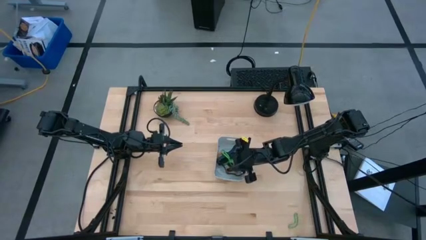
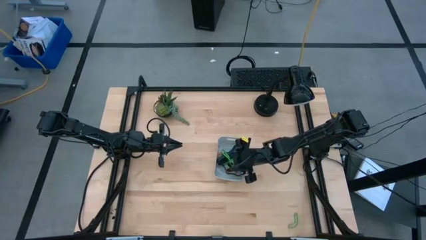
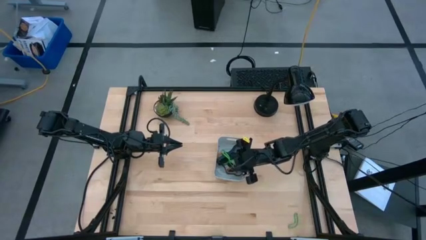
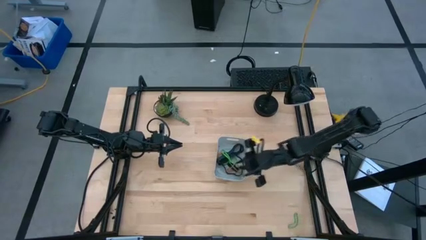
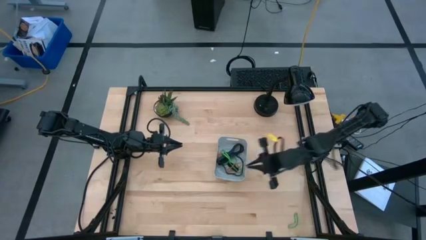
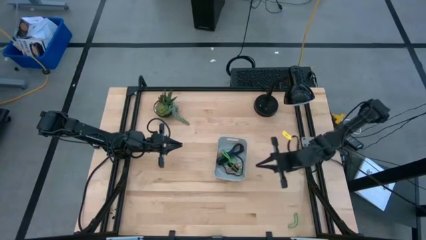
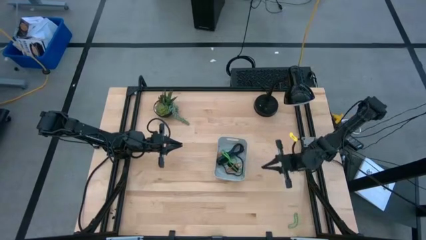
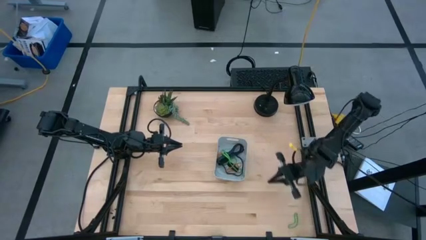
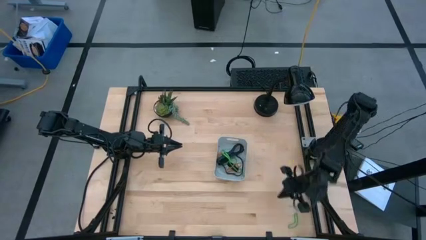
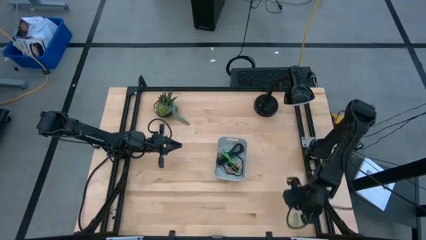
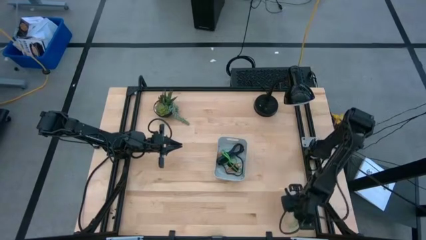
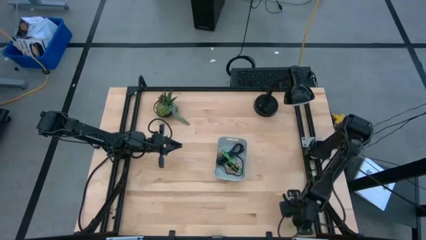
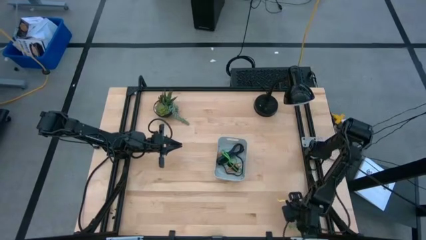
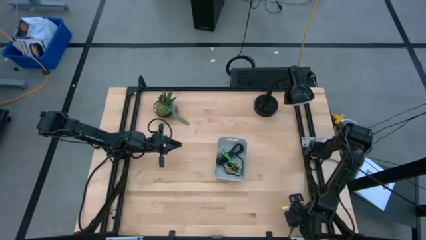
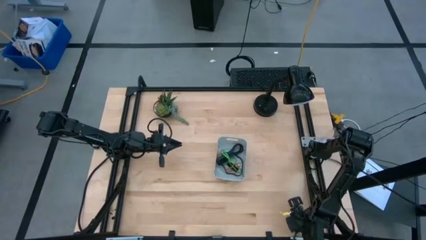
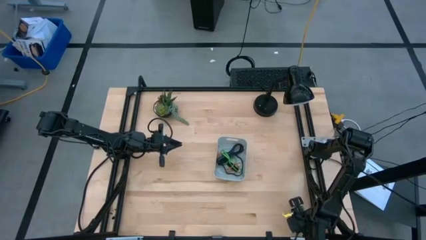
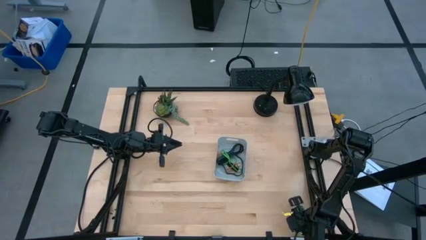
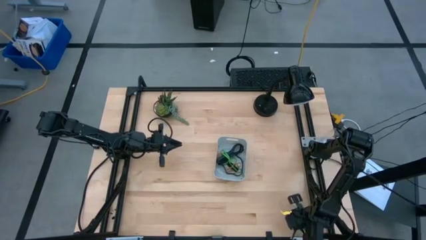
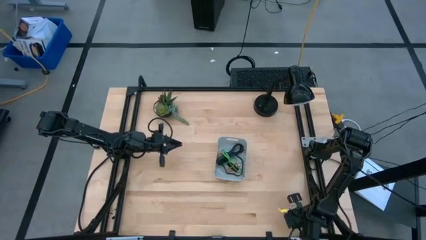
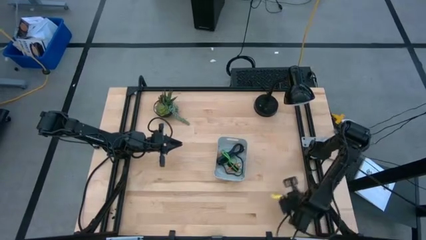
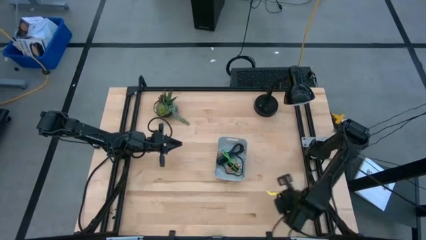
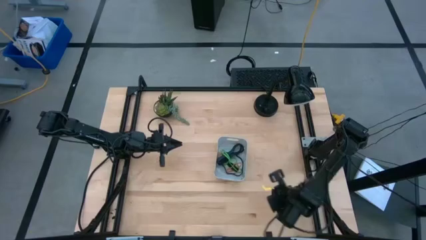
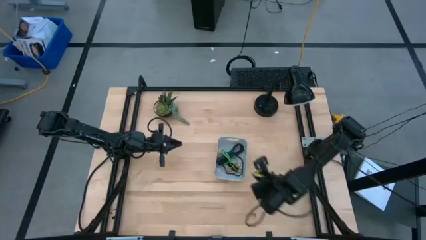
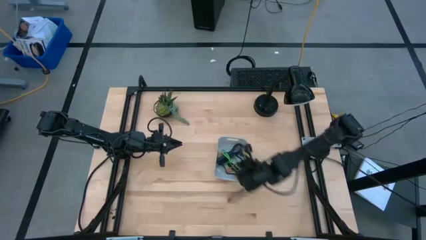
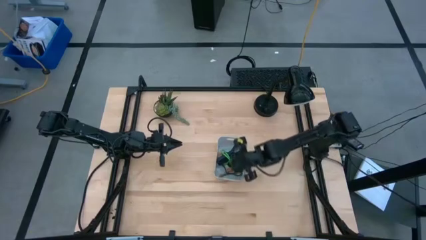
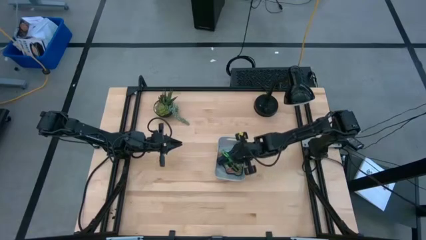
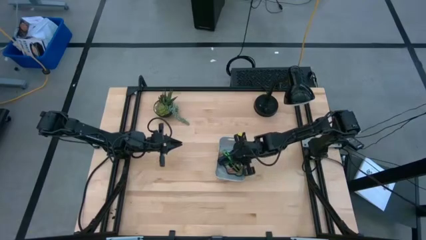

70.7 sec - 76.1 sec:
Task: Pick and place rubber bands into bin
Put the green rubber band into the white bin

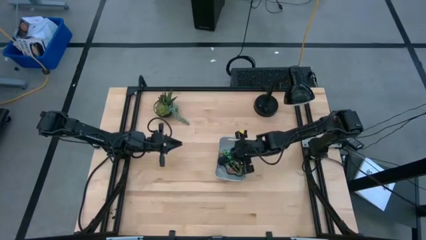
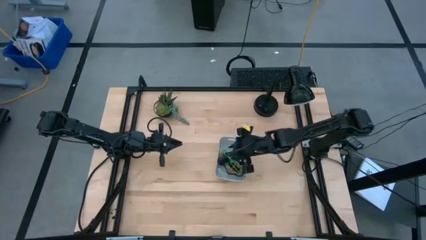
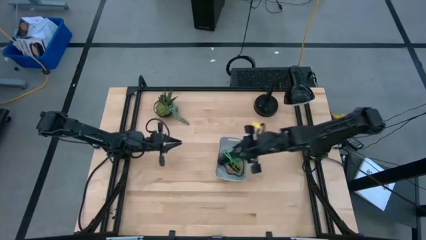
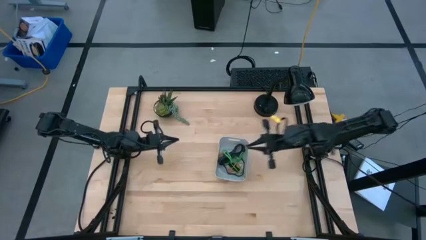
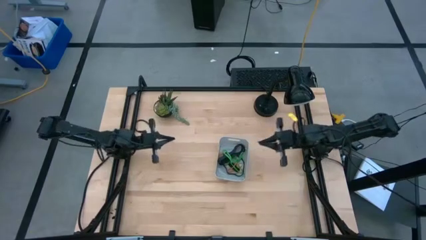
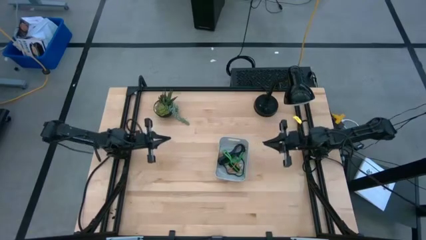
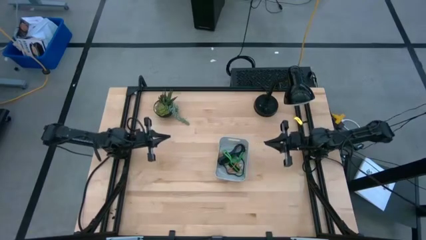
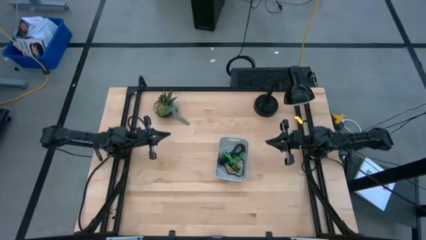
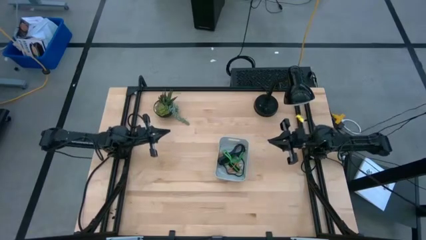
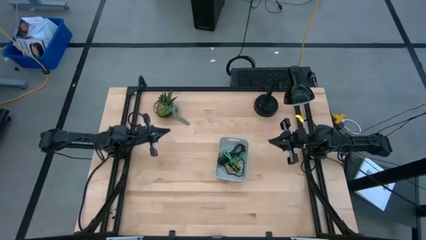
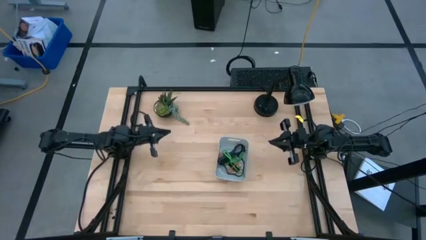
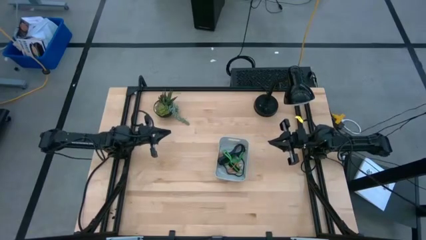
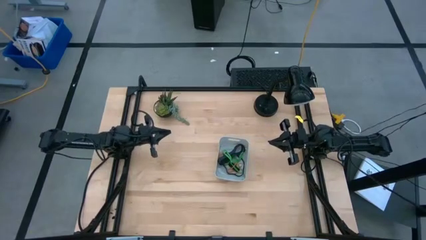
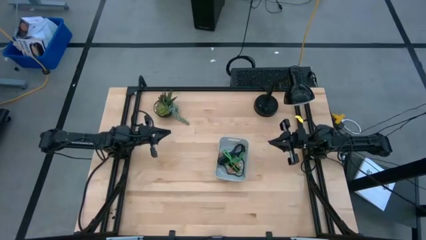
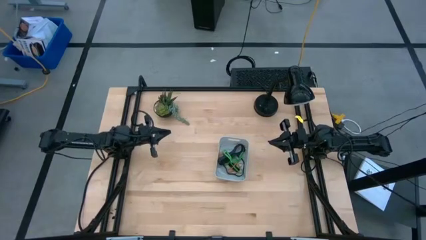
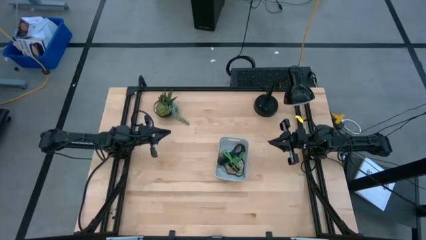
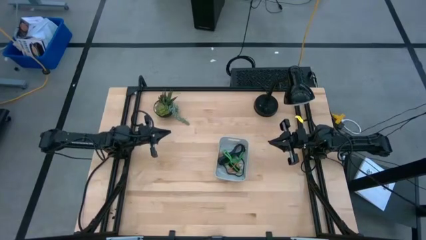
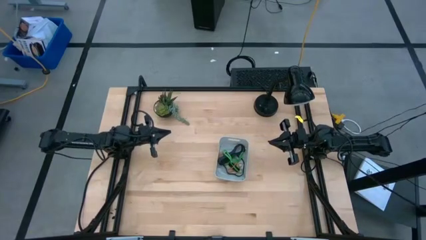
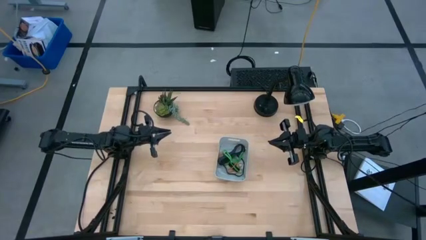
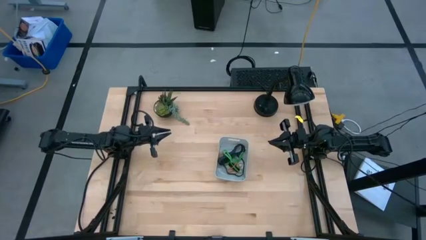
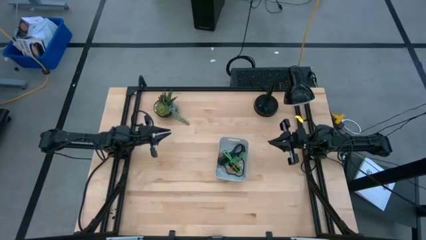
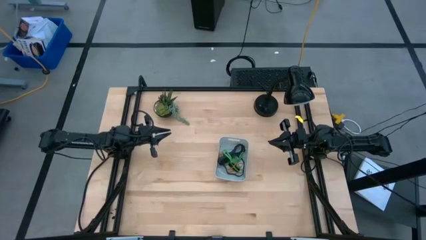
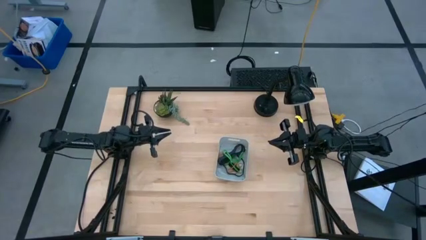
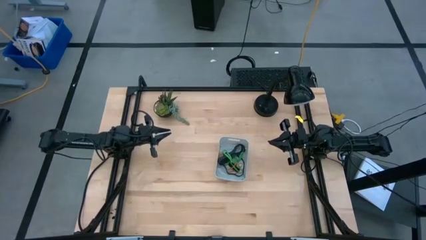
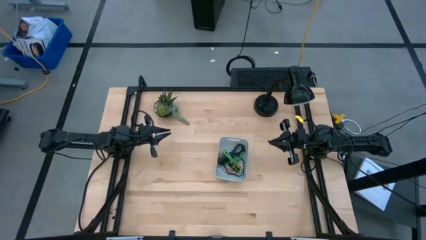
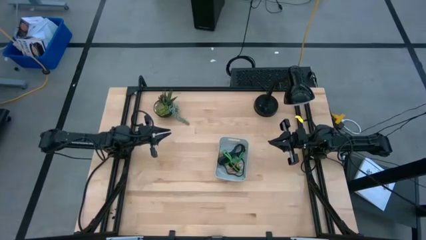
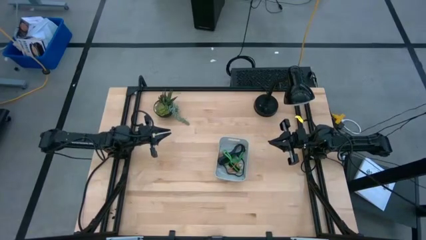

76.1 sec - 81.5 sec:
Return to Home Position

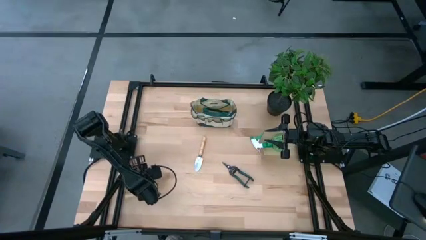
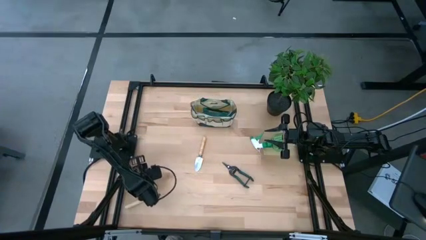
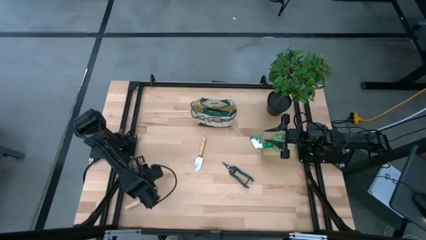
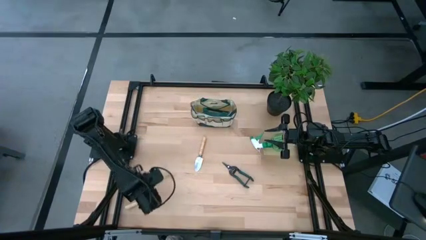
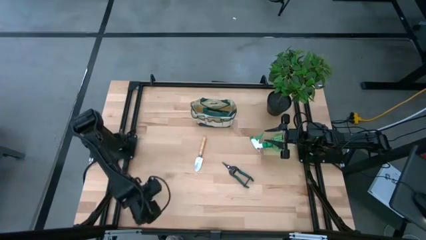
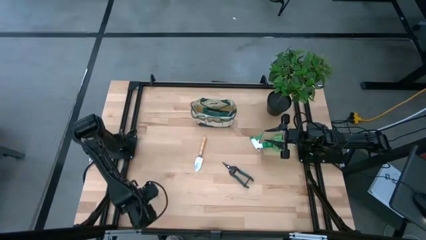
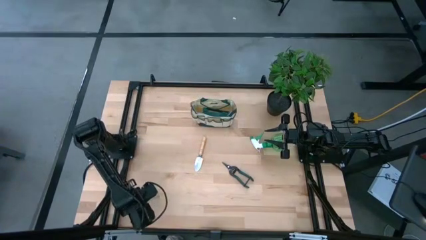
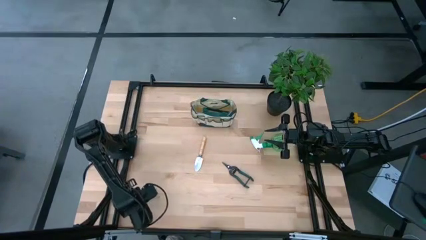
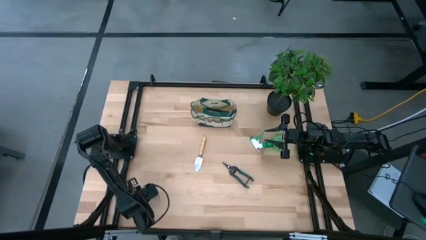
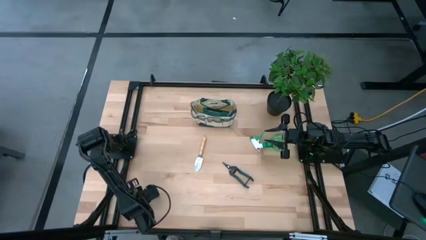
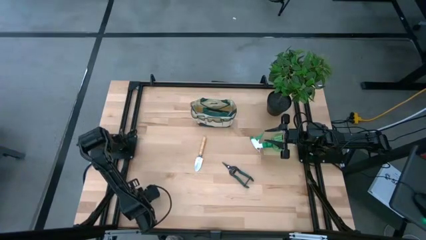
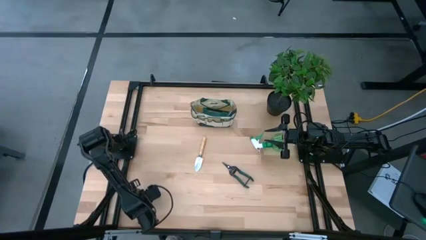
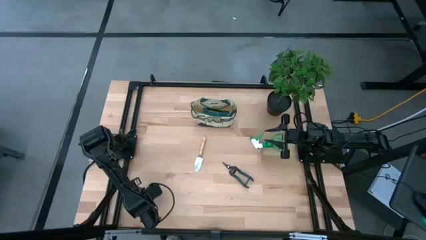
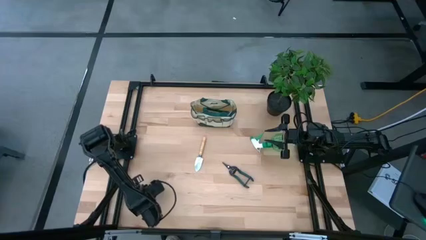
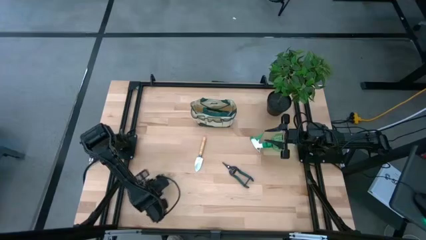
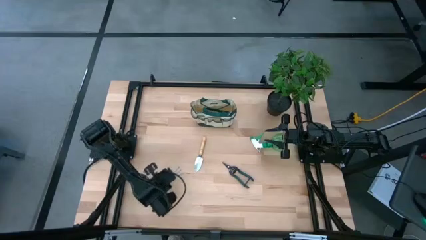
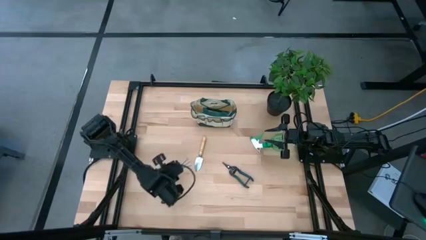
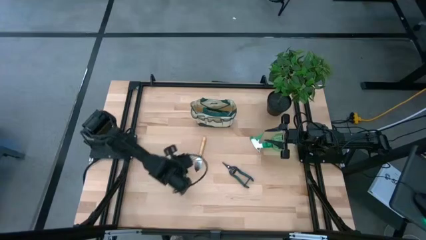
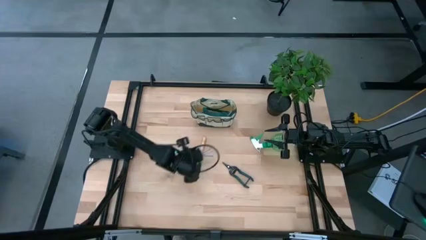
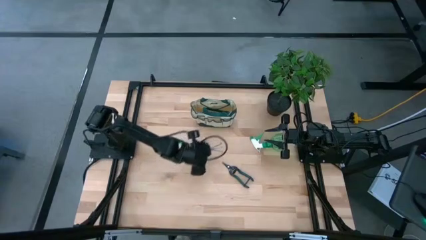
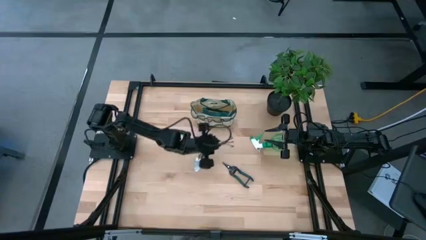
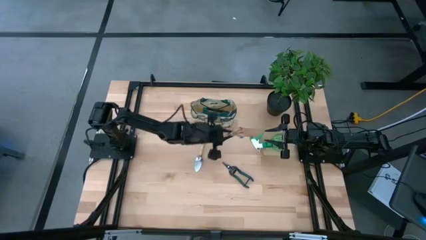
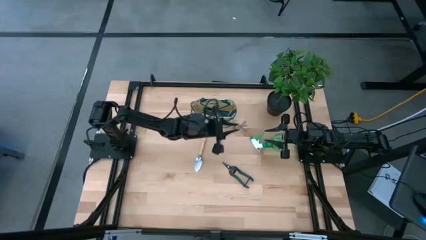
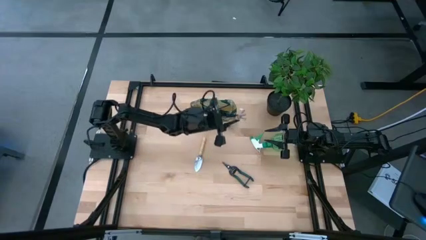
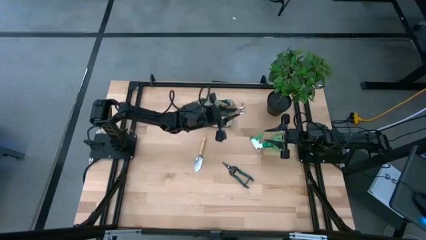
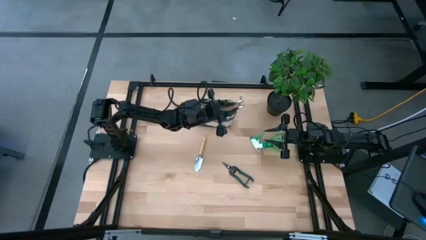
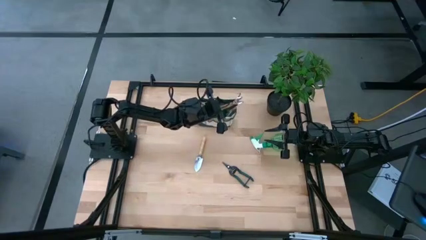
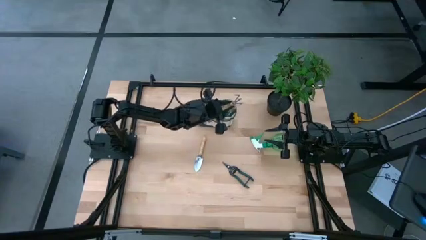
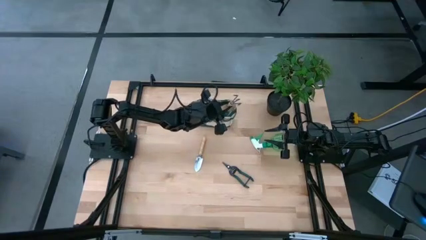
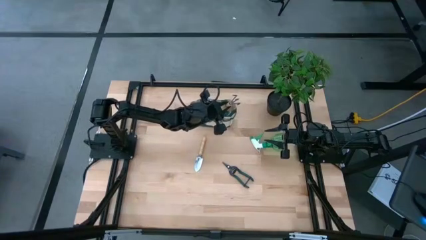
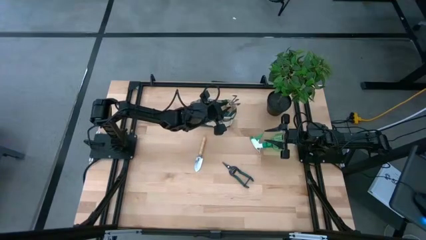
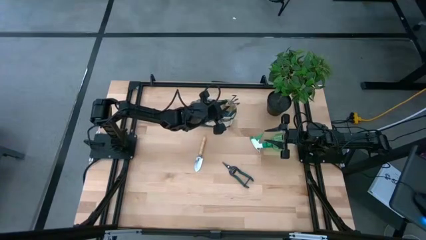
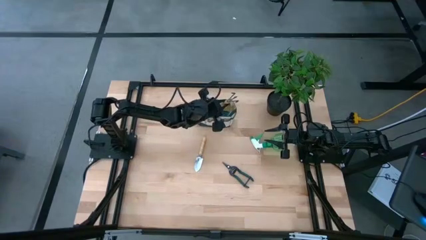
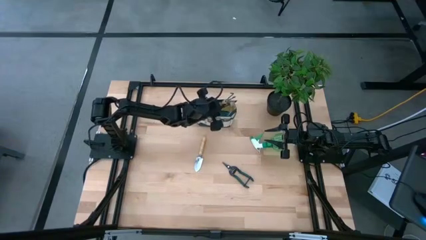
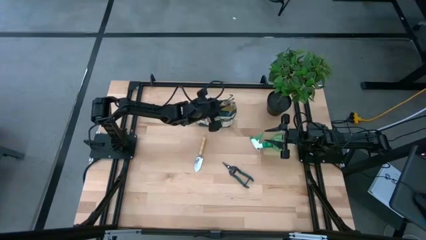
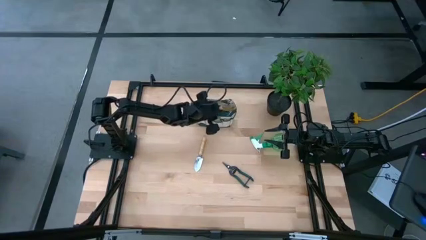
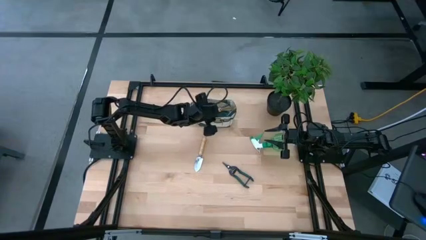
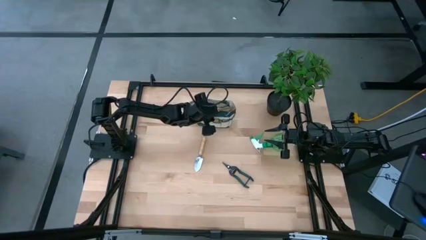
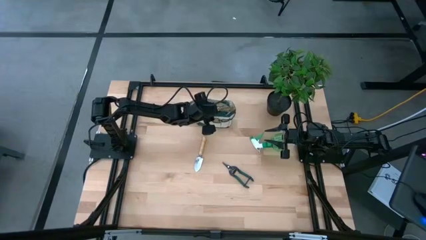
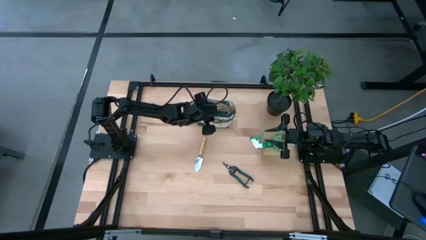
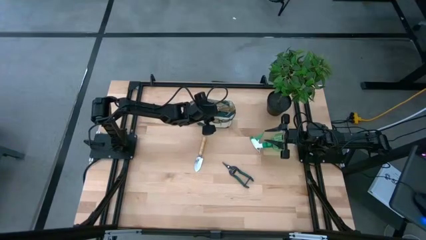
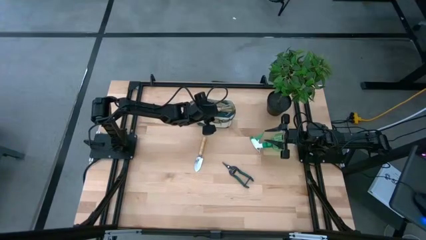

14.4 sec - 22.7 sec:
Task: Pick & Place Garden tools in Gardening bag
Put the brown hand rake into the light brown gardening bag
